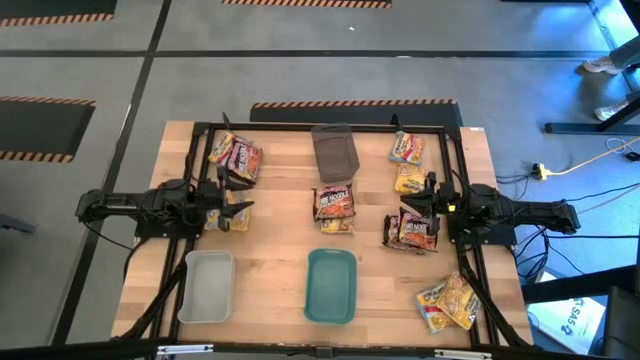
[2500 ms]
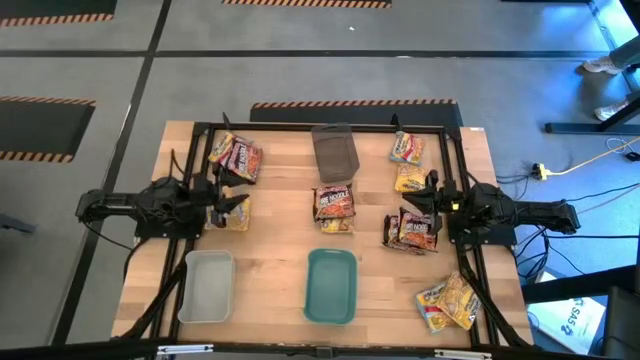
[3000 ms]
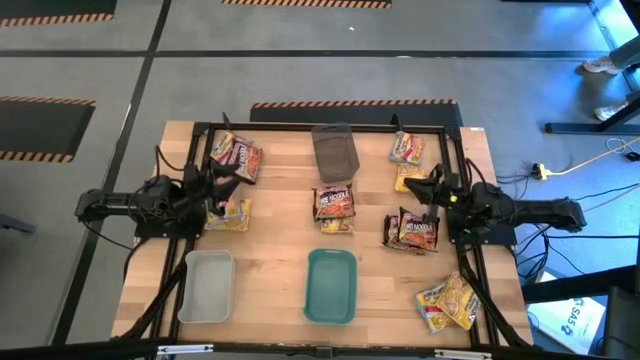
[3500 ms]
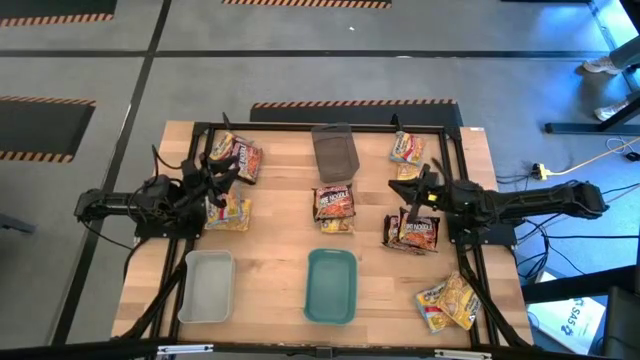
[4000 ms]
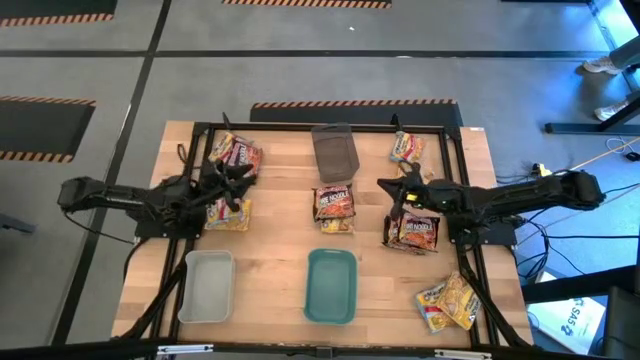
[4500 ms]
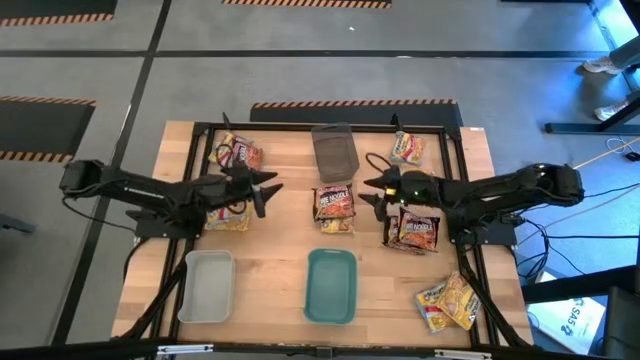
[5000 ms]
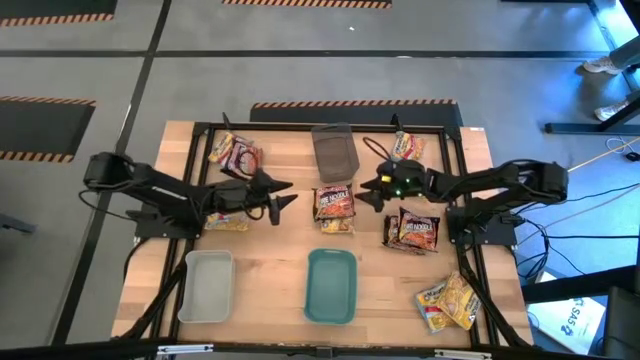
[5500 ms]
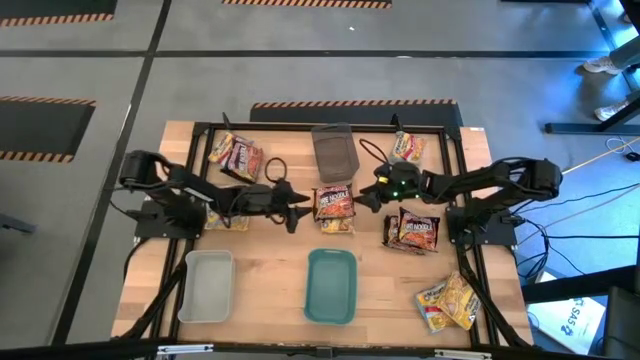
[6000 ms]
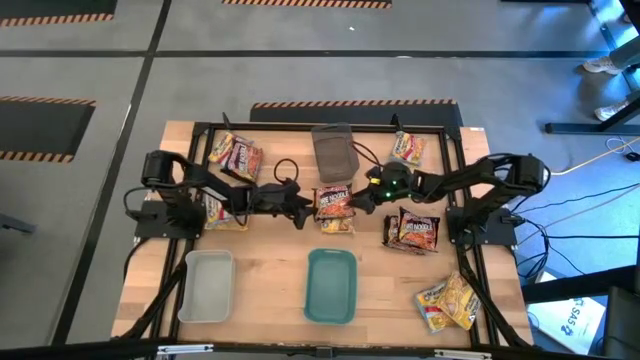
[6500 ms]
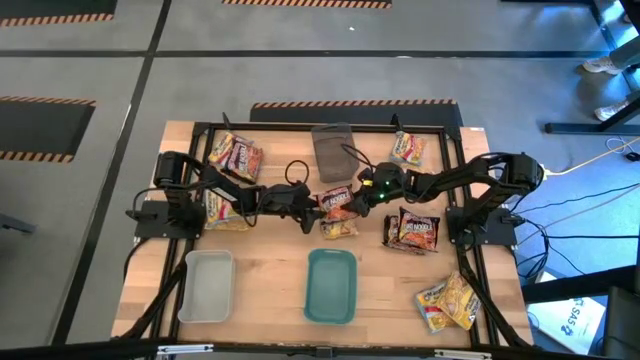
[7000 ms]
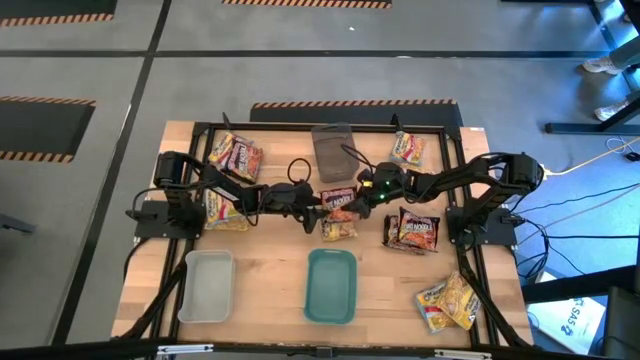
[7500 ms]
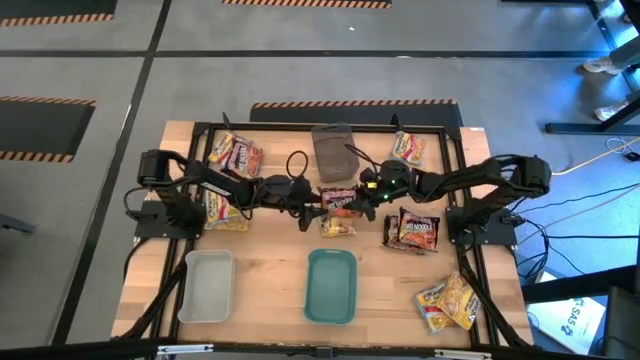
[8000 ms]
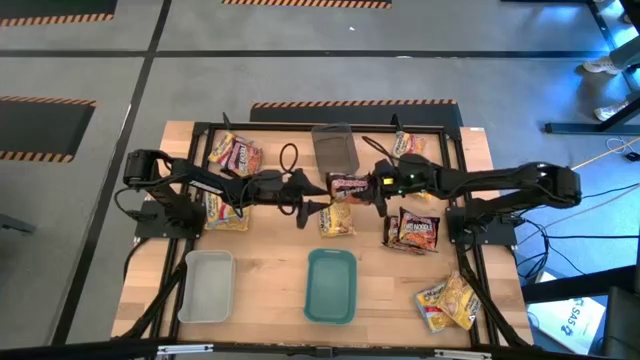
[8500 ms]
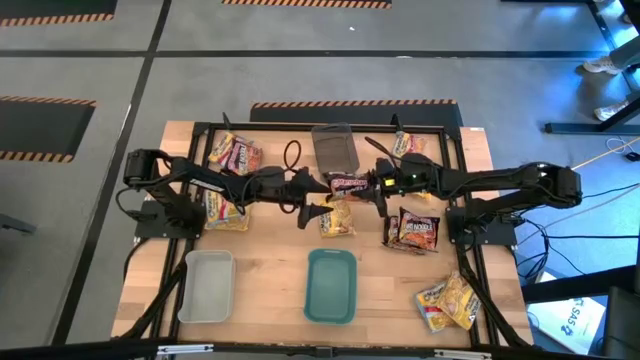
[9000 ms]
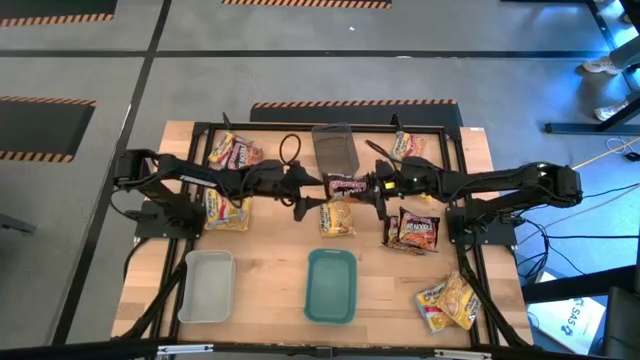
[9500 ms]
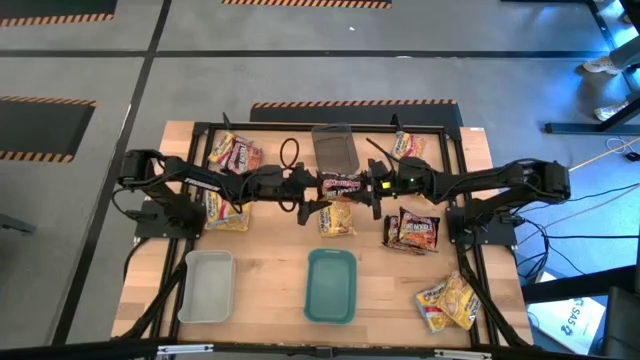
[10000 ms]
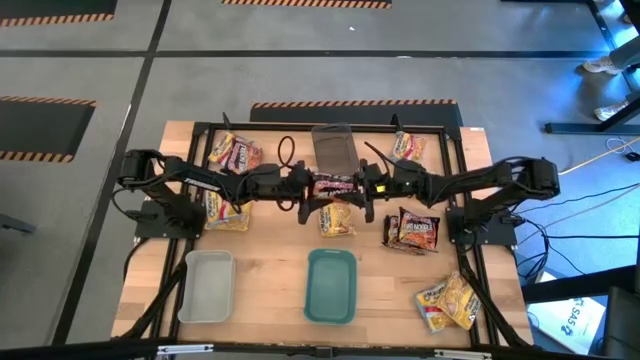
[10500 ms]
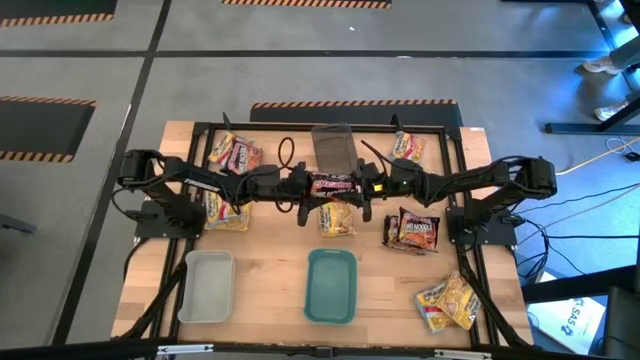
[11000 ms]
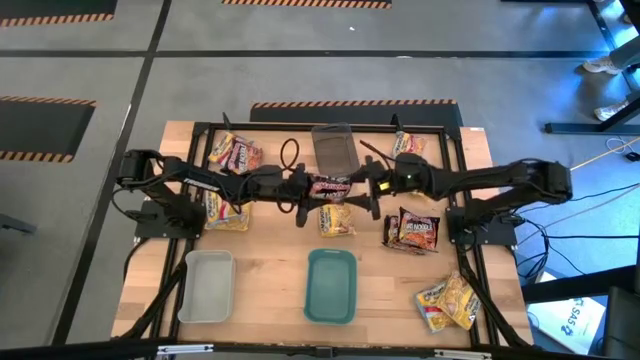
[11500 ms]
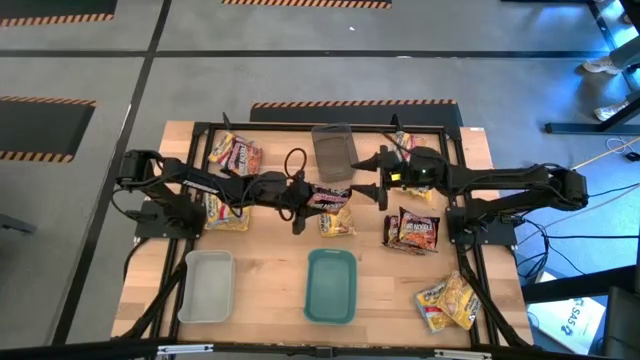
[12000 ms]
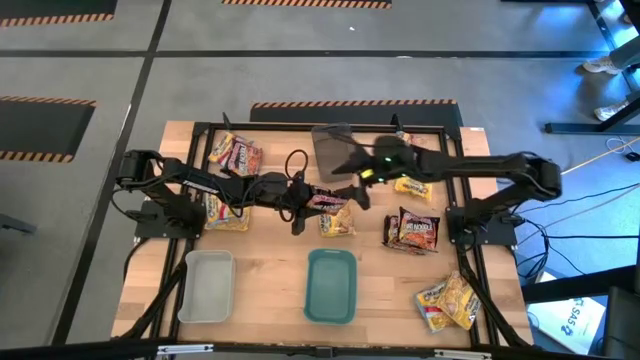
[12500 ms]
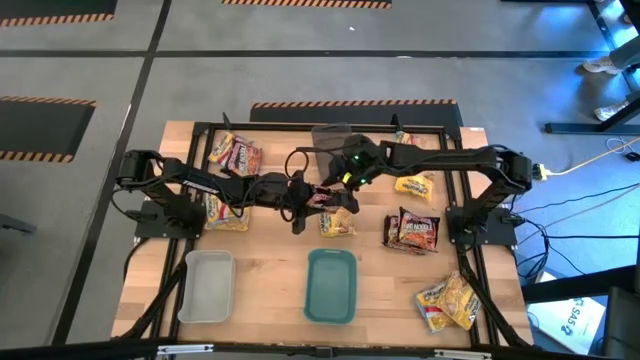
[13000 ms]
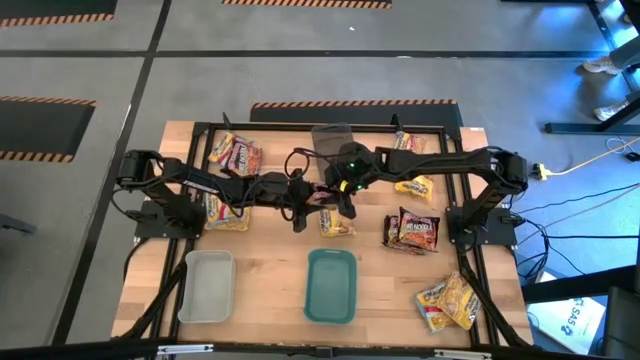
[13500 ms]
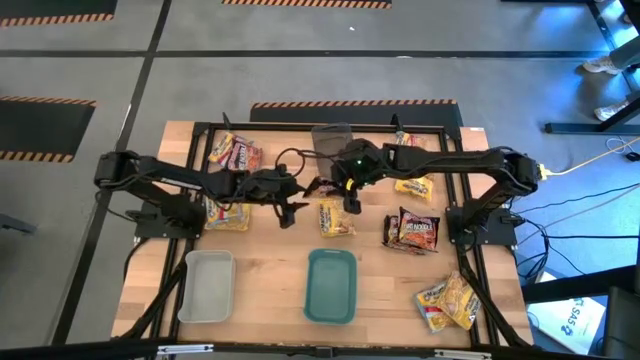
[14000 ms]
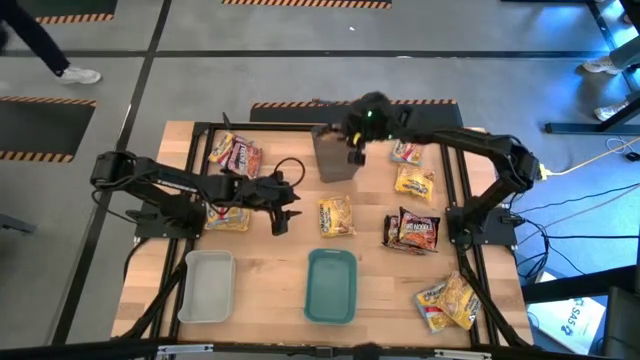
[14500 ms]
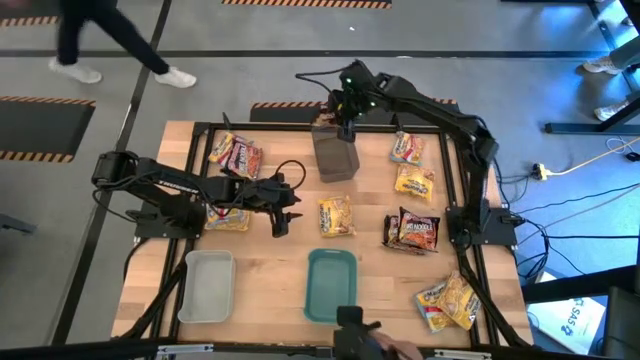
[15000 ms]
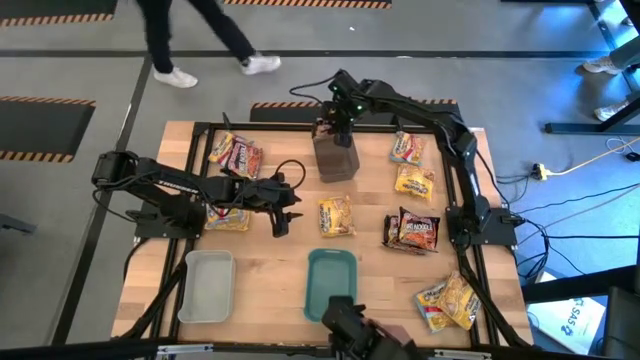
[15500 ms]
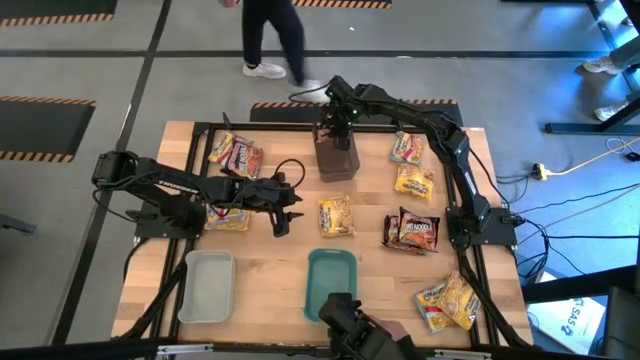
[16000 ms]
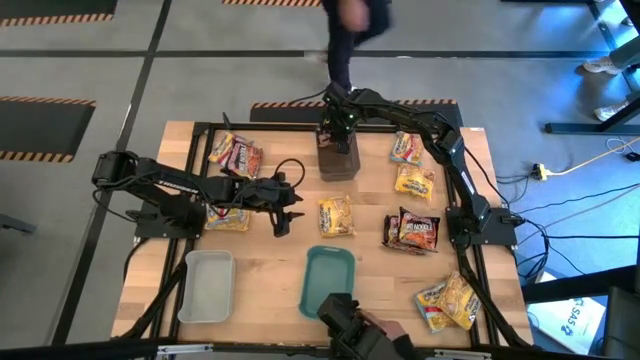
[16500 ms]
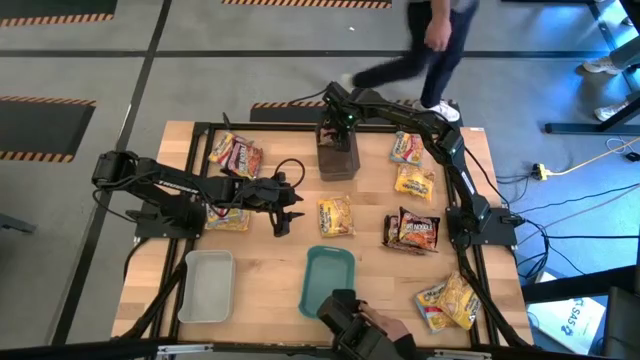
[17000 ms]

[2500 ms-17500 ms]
Task: Sort Maruchan noodles
Put the black noodle pack into the black bin

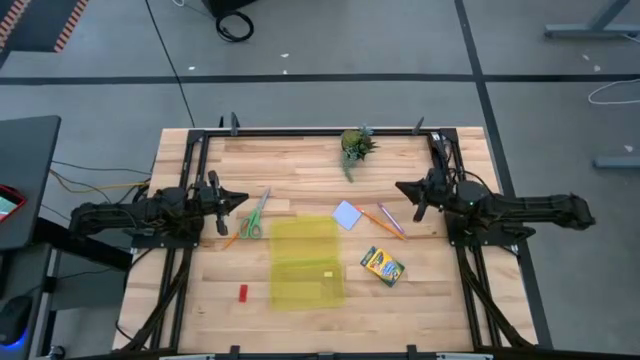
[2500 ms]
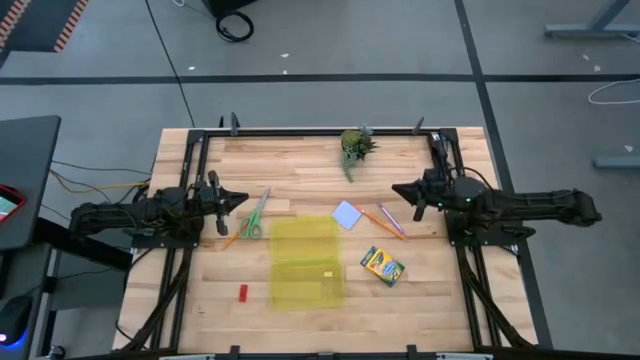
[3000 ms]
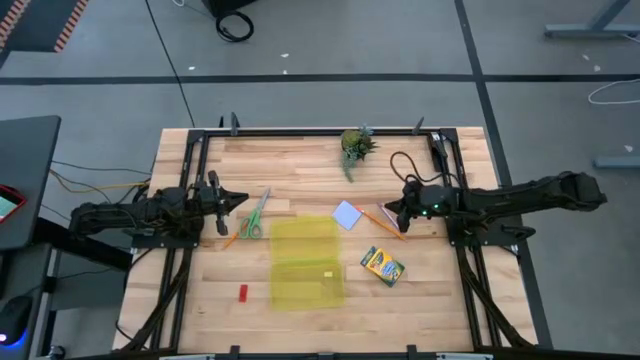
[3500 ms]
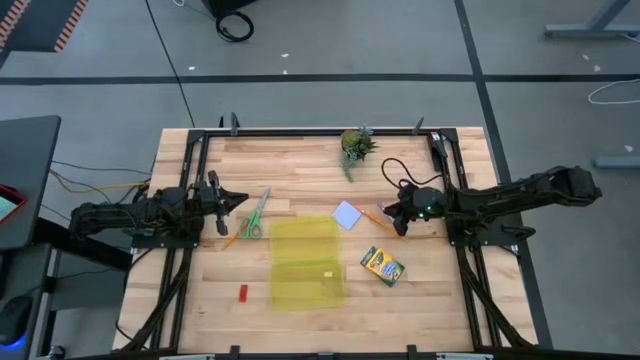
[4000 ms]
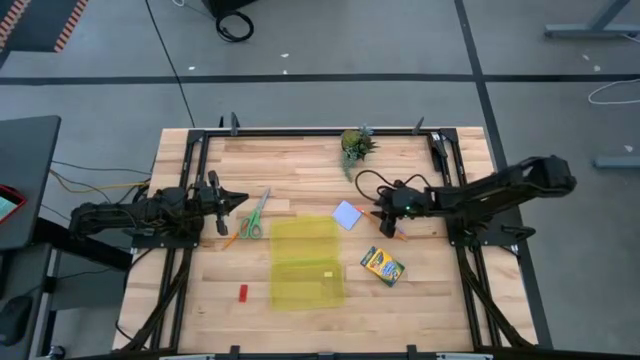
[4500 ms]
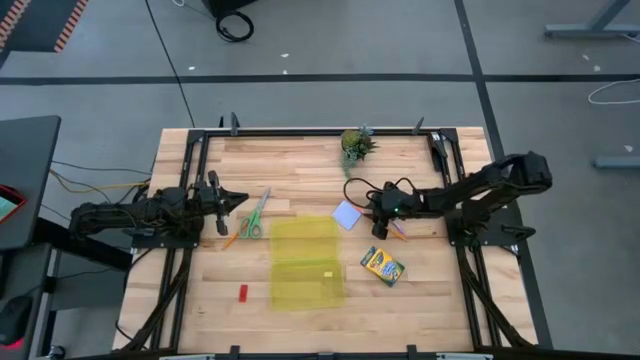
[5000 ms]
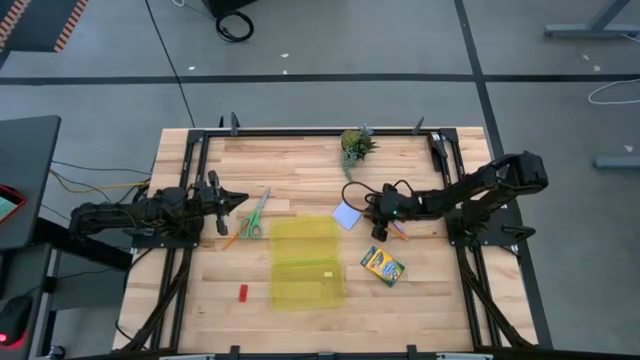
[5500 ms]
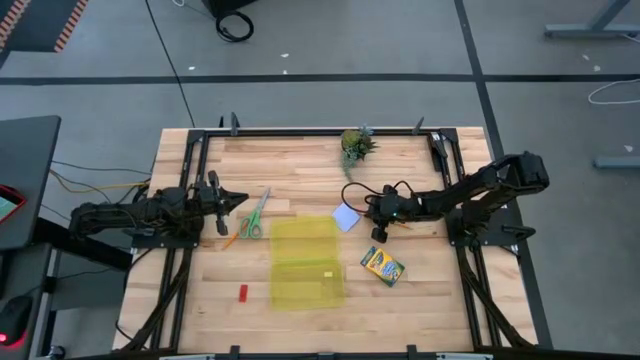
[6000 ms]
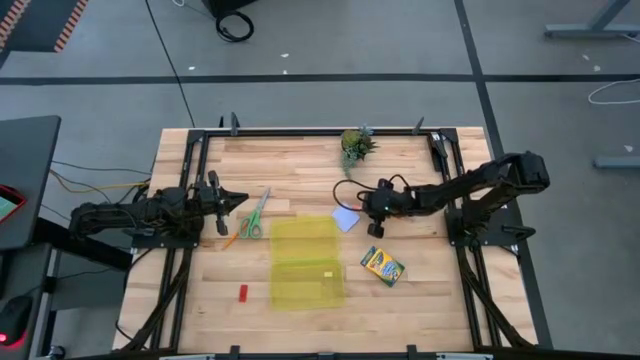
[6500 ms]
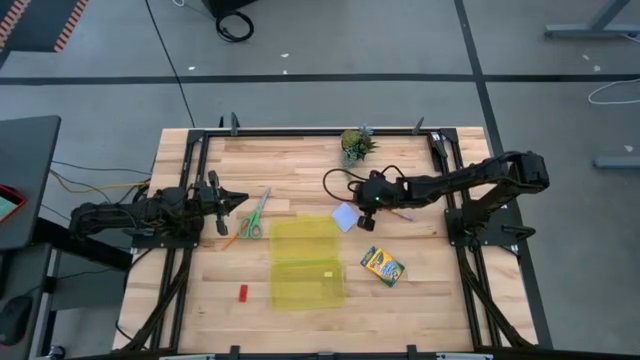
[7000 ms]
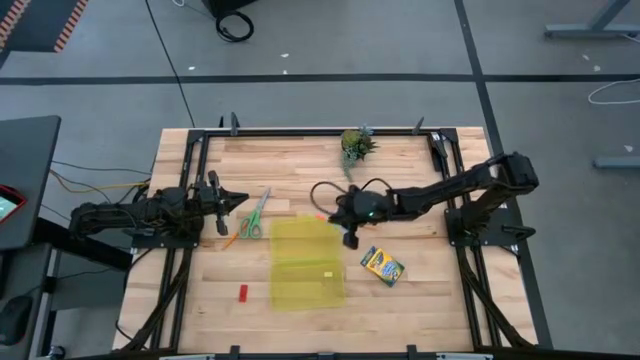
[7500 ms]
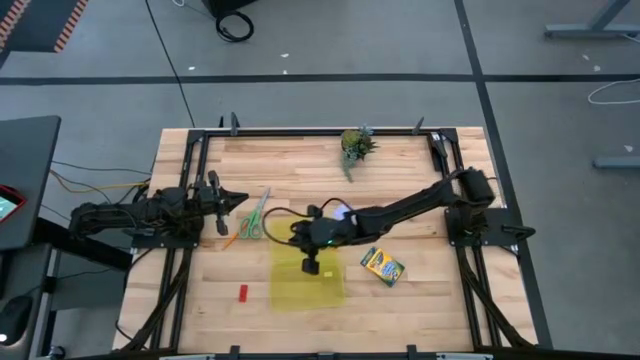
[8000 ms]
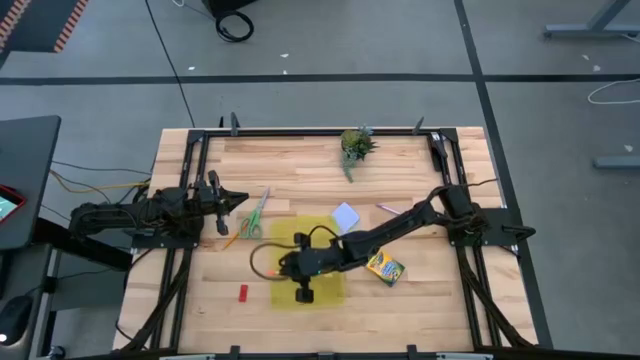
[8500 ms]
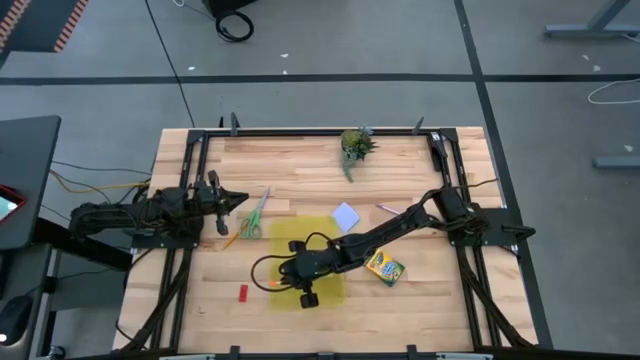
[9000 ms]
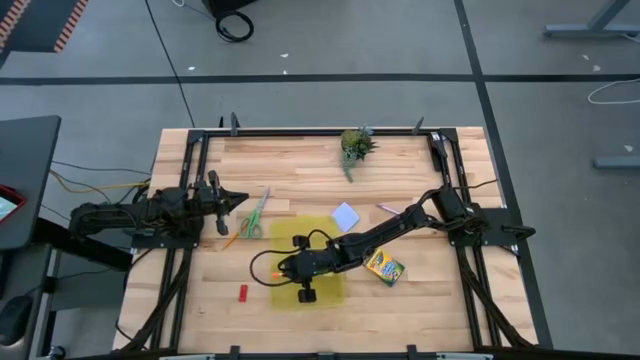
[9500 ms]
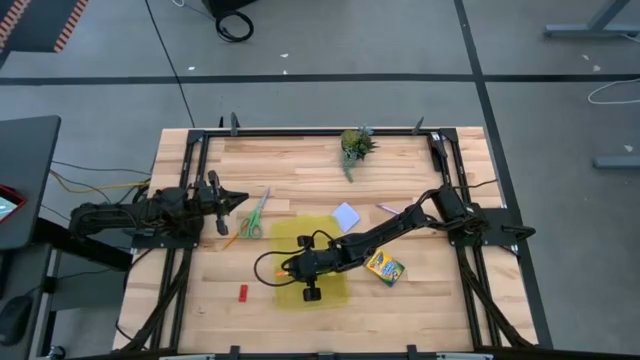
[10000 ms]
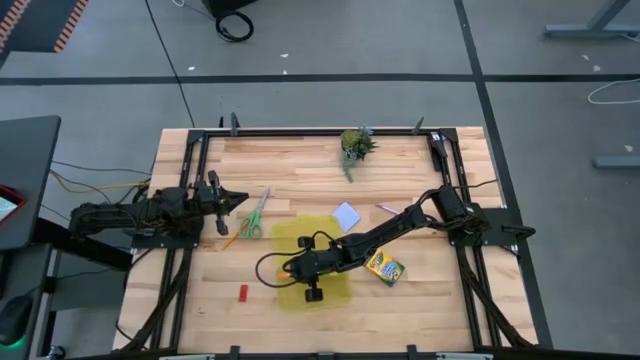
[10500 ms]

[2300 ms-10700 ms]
Task: Pack school essentials
Put the right yellow pencil into the yellow supply box
